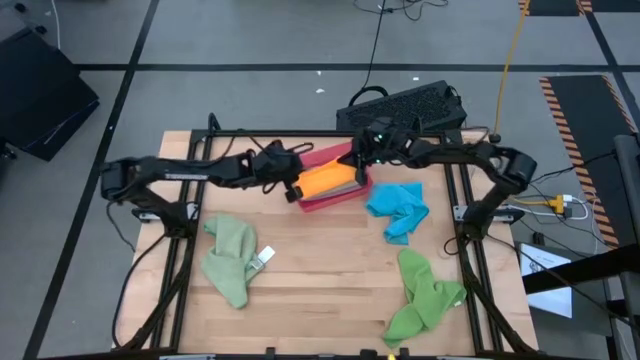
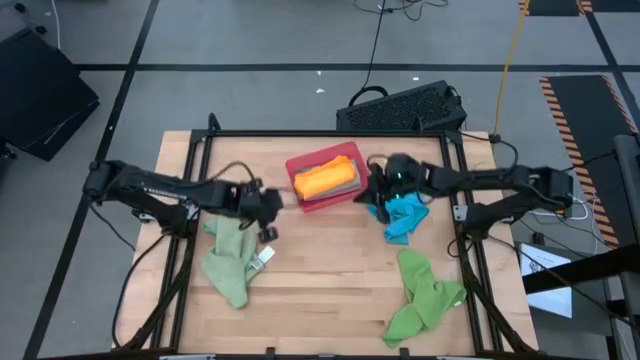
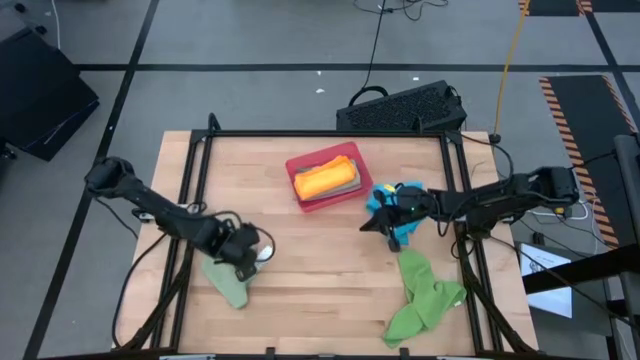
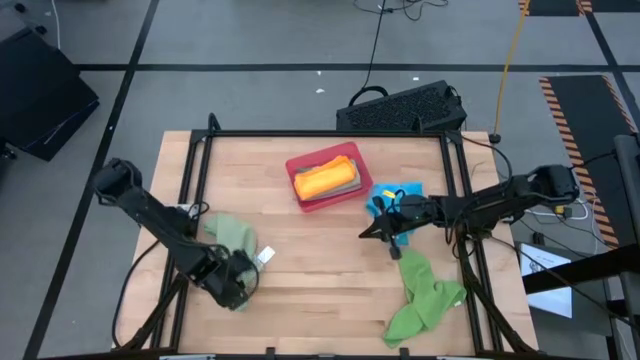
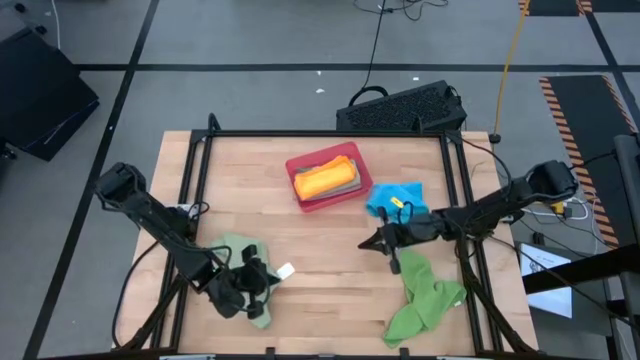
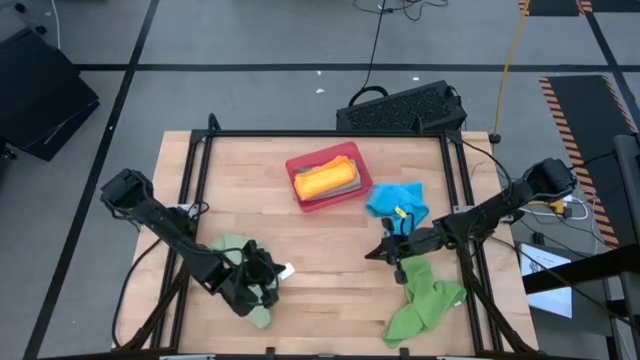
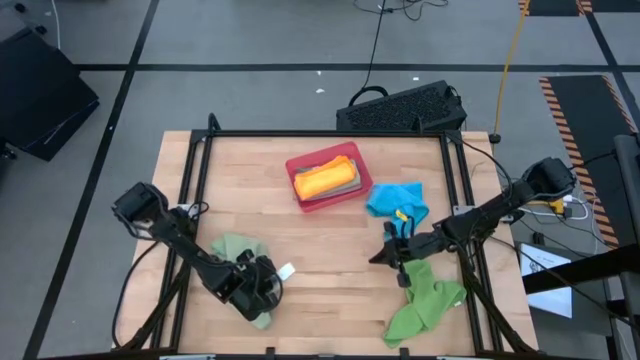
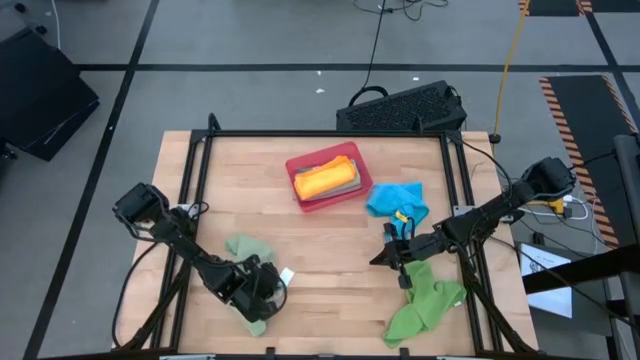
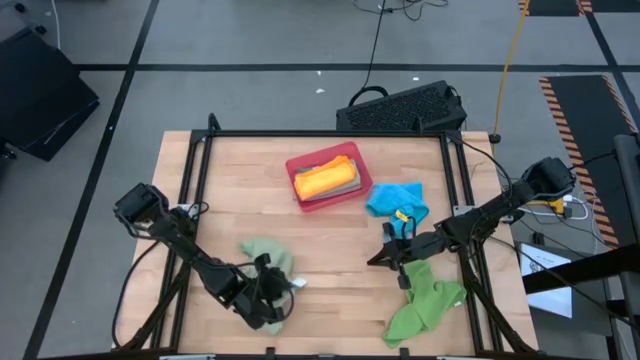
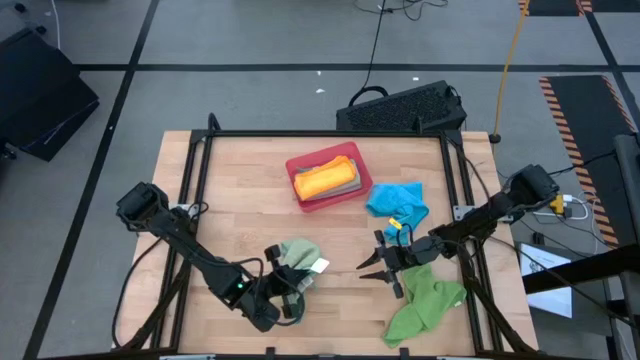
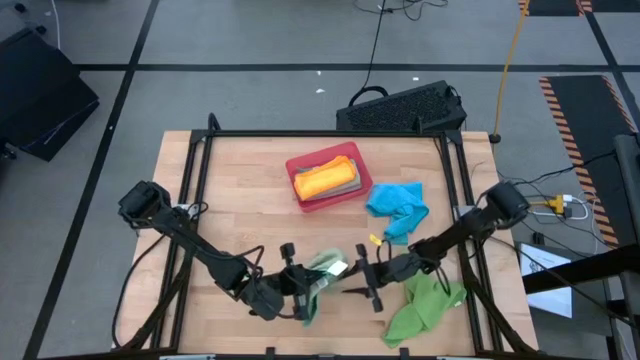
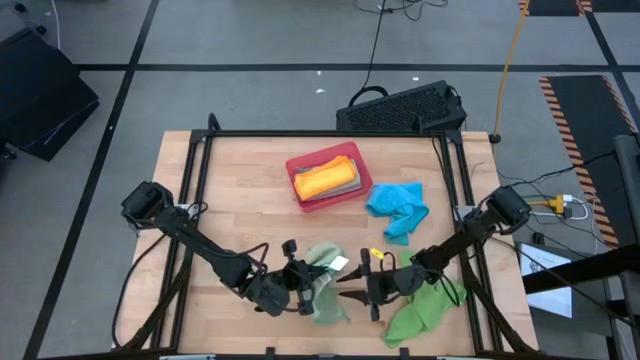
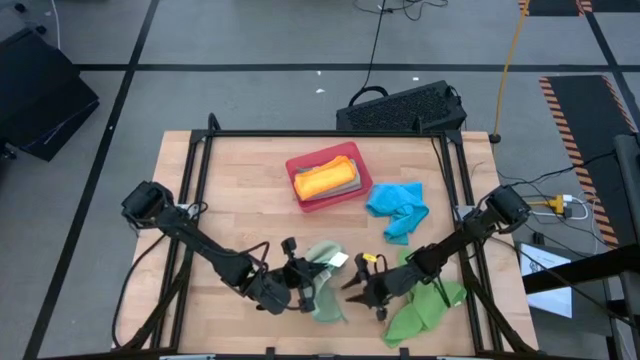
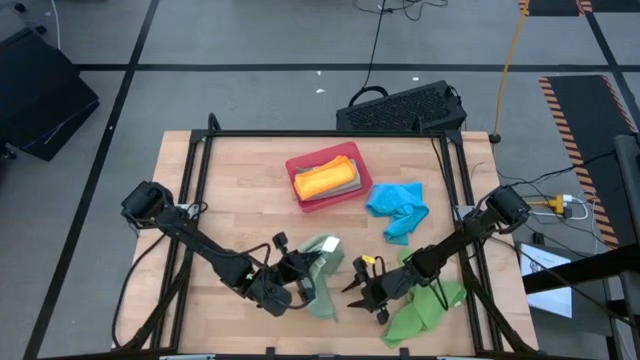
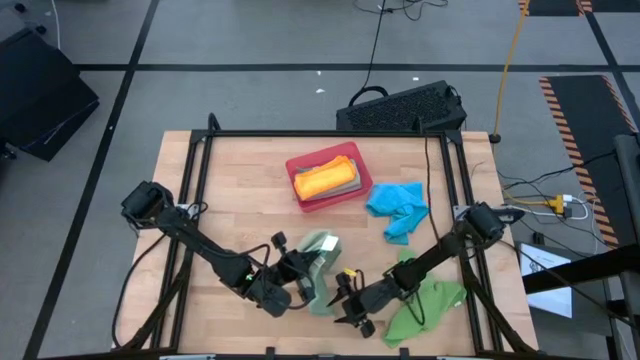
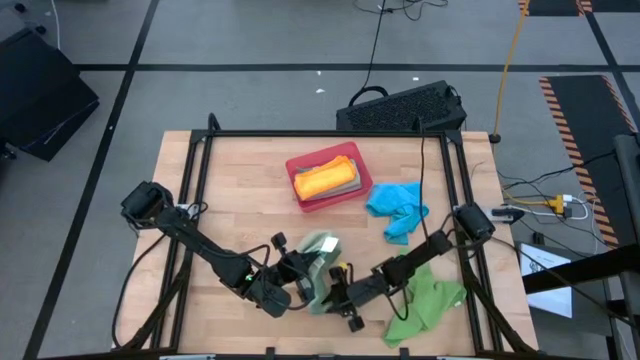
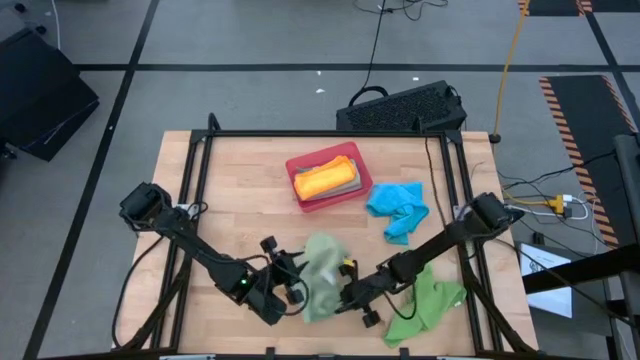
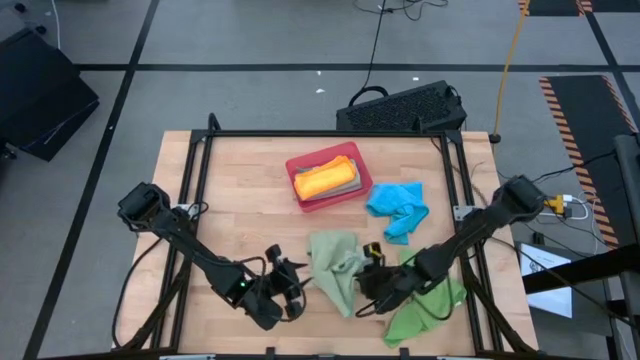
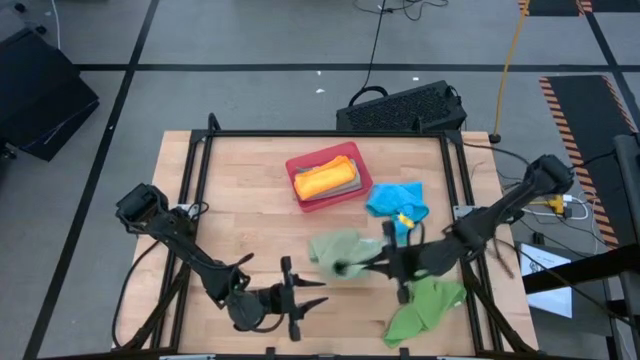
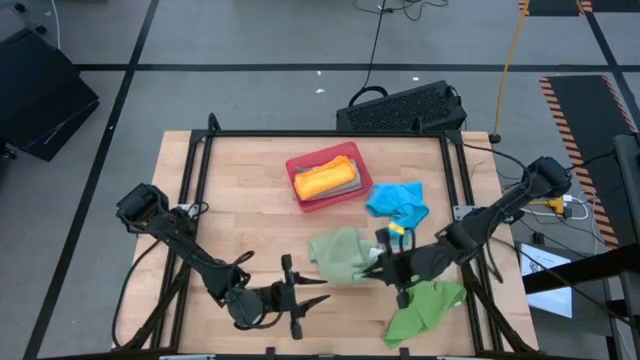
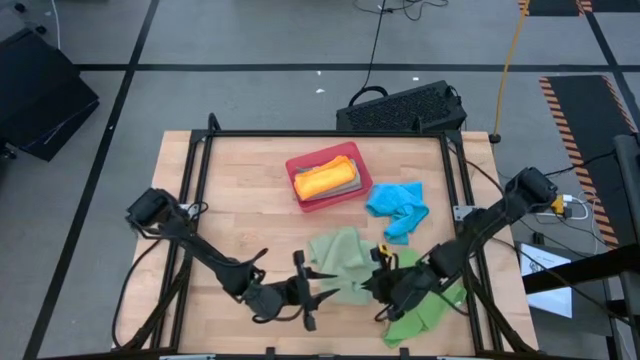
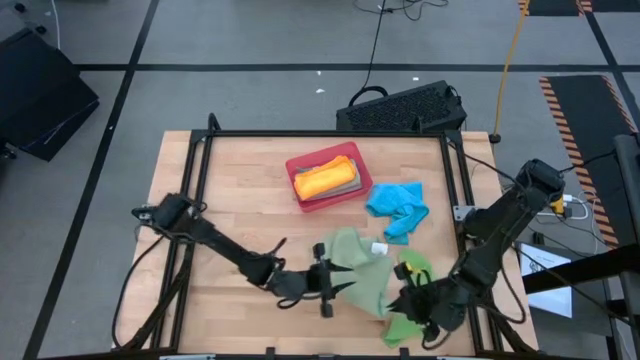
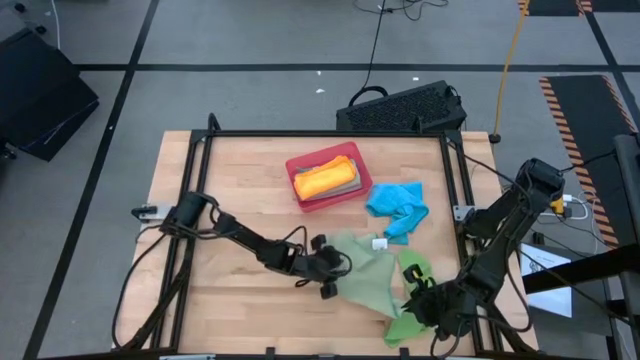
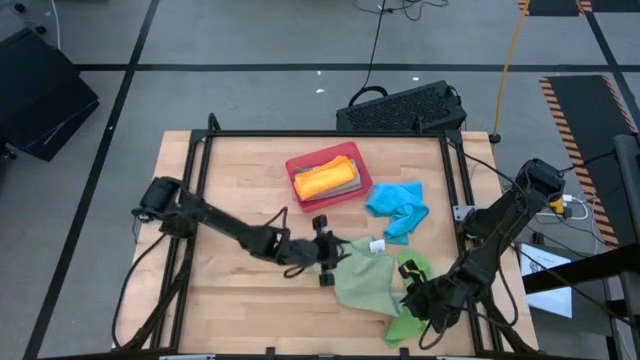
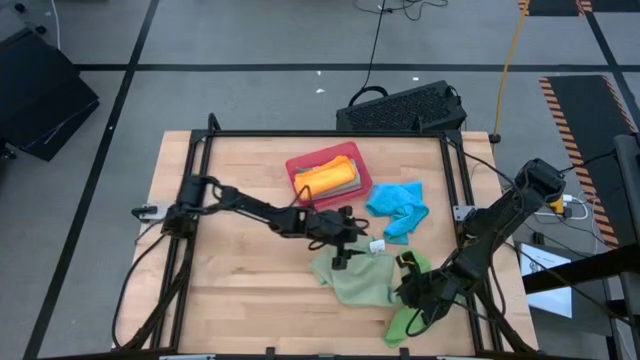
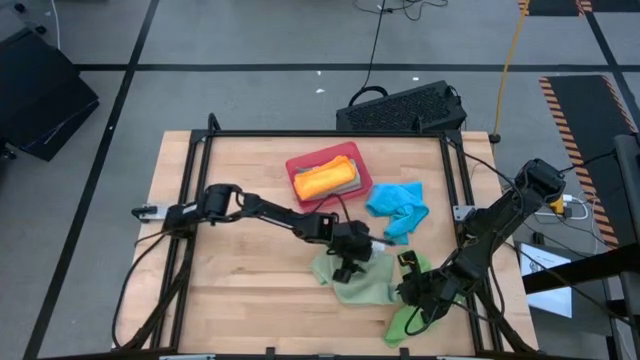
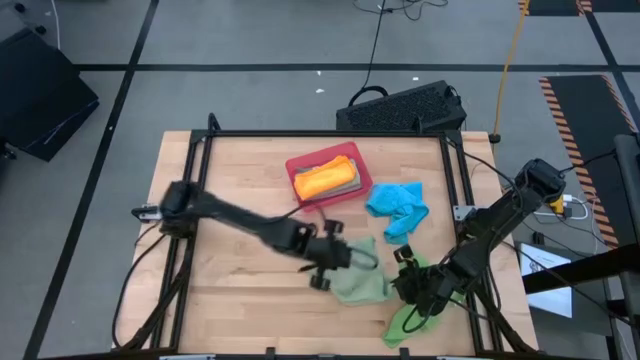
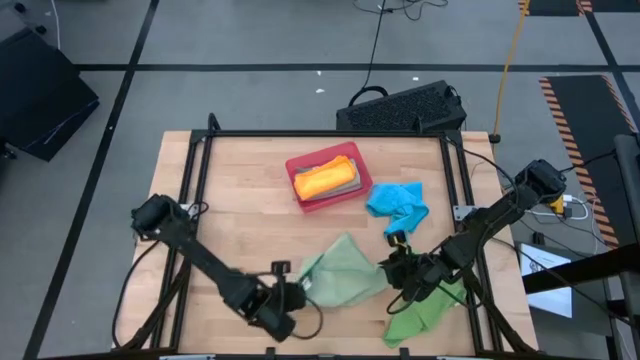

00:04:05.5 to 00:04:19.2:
Task: Fold microfiber towels
Fold the light green microfiber cloth
